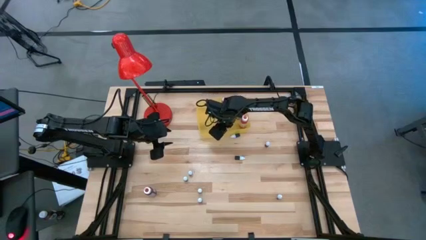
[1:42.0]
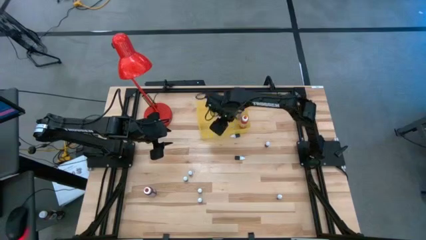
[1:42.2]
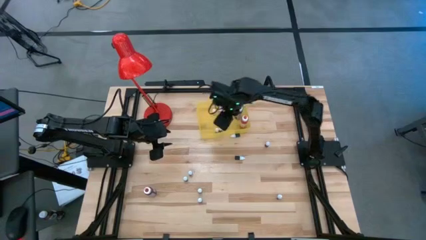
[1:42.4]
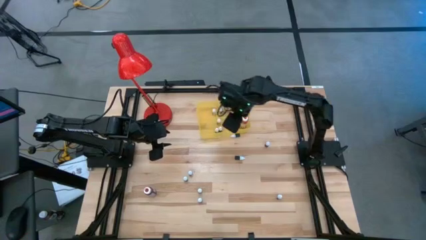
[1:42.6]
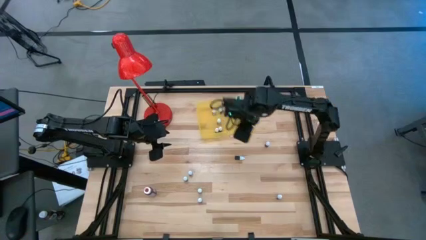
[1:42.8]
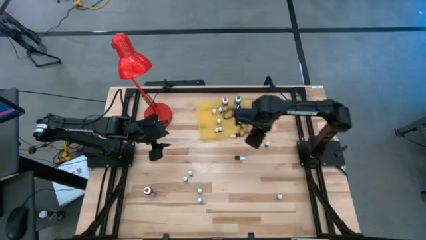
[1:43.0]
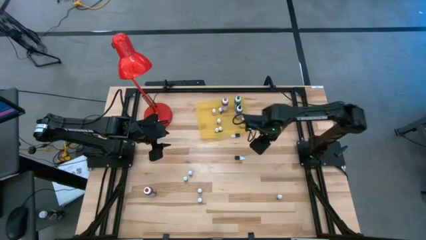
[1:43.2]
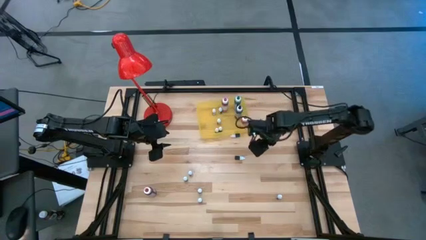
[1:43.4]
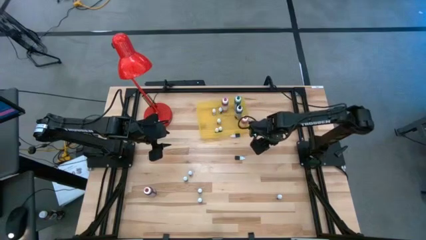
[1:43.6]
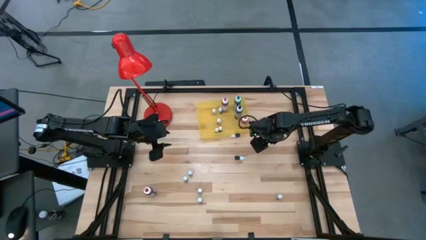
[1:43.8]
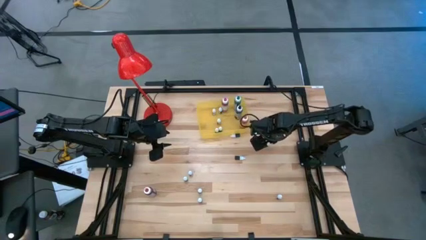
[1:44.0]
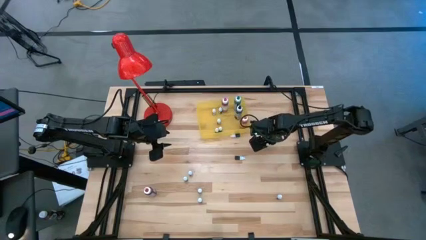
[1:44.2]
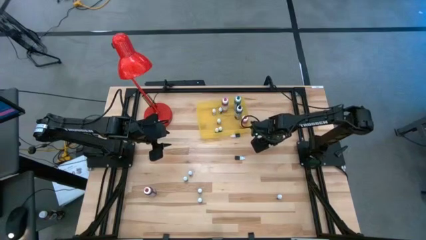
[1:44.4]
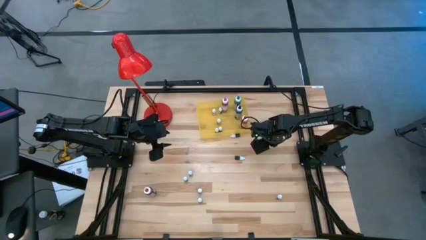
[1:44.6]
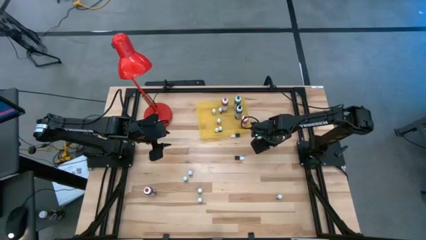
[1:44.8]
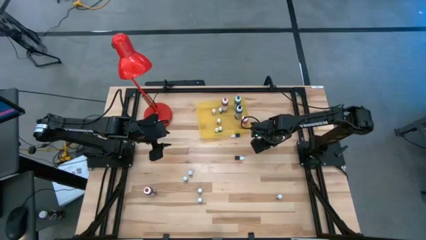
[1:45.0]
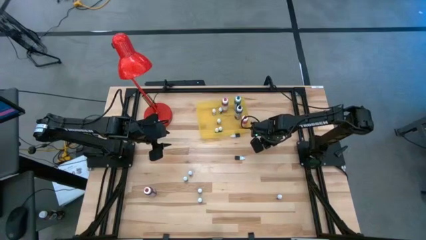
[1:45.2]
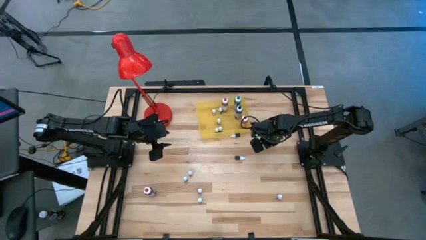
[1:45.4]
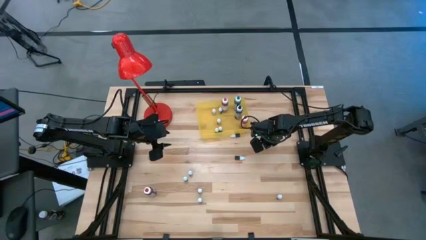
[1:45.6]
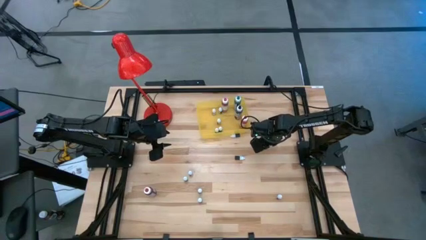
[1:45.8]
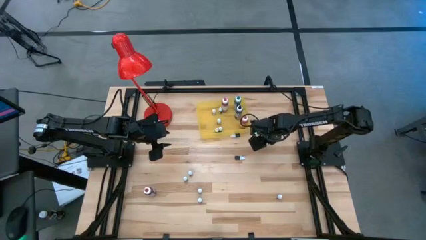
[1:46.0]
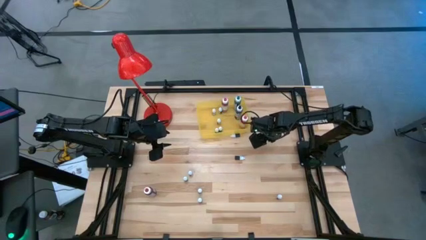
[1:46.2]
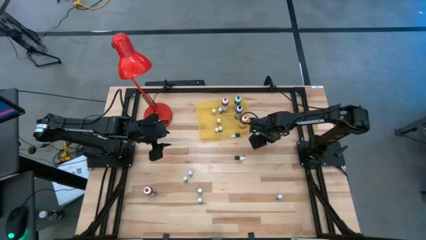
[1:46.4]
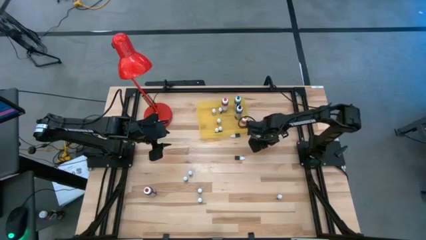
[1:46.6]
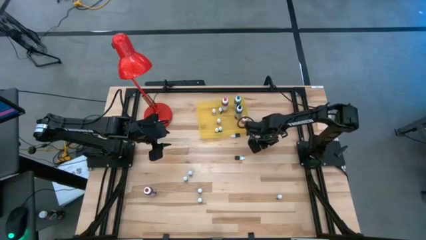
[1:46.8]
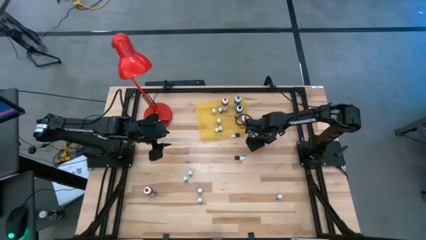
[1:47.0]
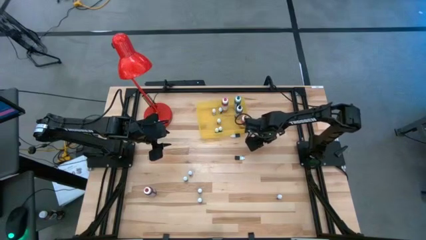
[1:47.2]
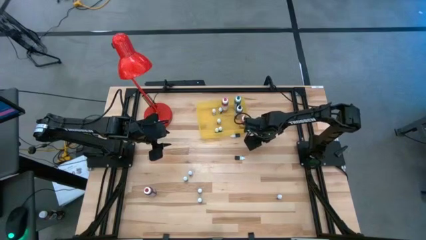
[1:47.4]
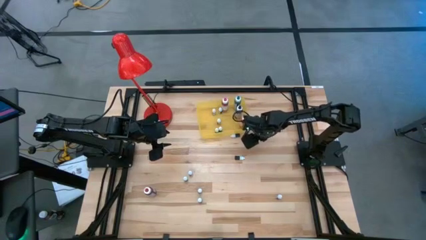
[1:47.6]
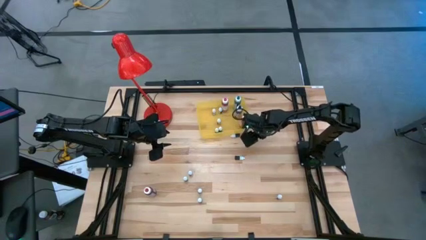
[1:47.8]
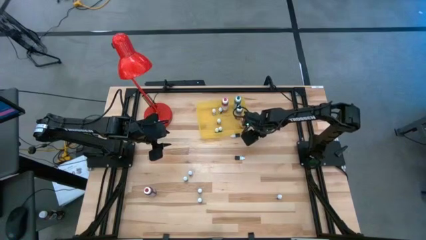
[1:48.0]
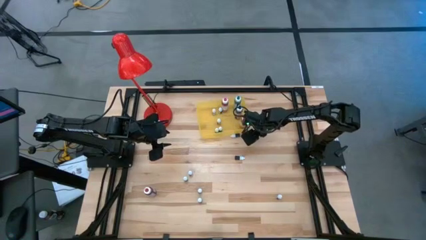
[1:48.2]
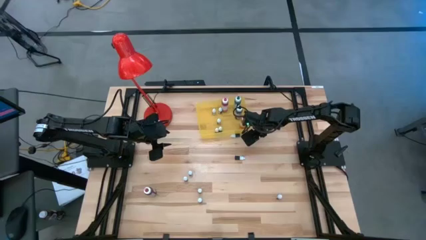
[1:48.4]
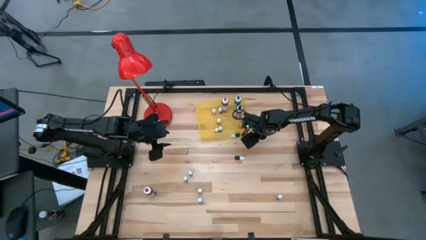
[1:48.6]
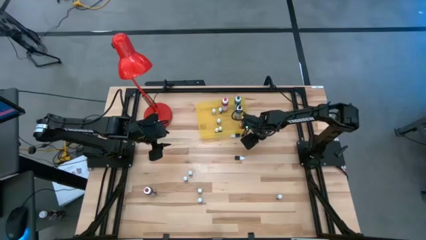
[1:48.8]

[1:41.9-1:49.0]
Task: Pick & Place food coloring
Put the small purple food coloring bottle into the yellow bin

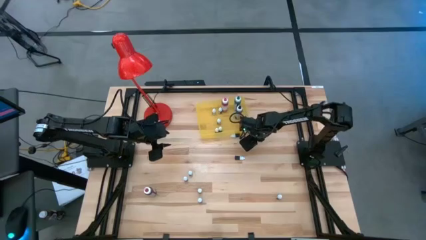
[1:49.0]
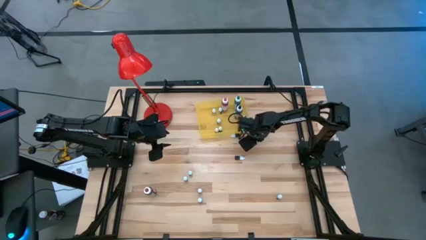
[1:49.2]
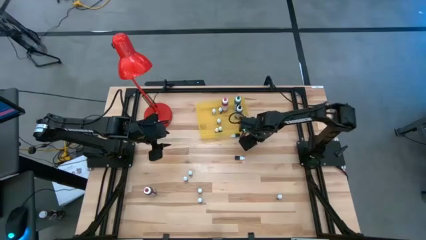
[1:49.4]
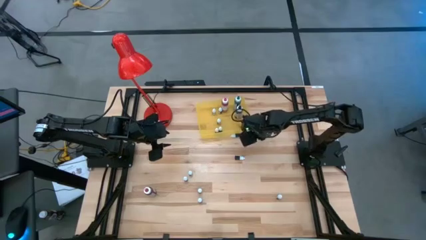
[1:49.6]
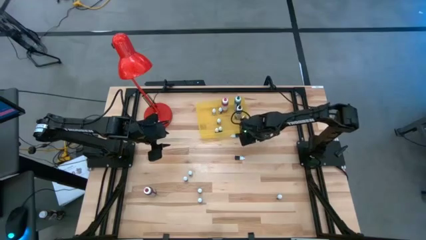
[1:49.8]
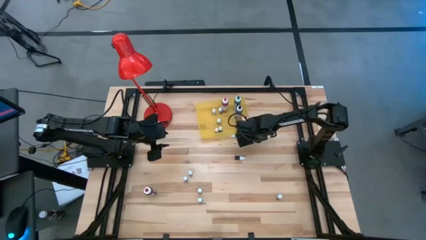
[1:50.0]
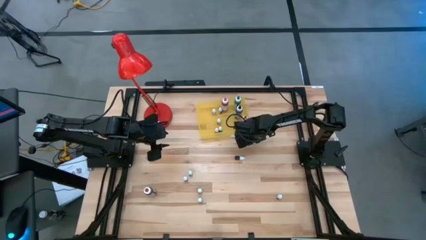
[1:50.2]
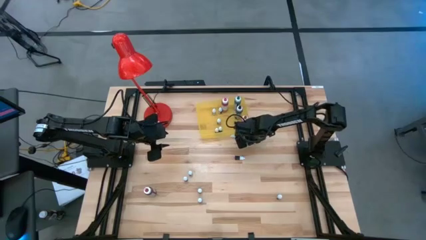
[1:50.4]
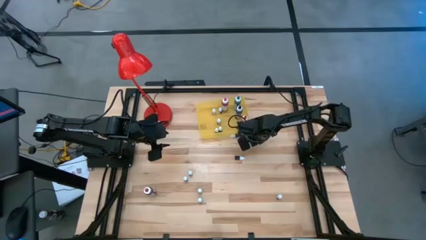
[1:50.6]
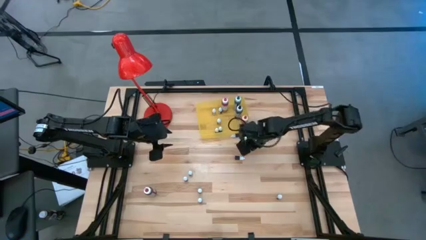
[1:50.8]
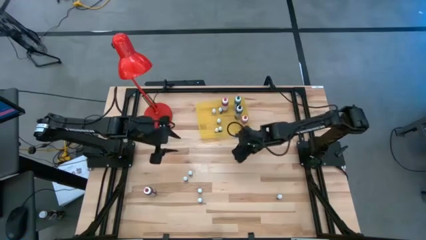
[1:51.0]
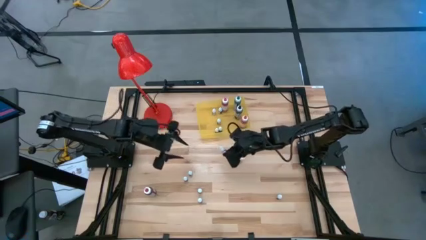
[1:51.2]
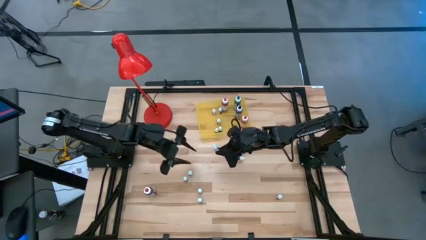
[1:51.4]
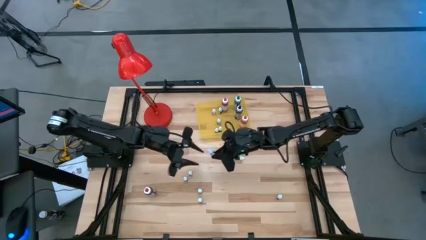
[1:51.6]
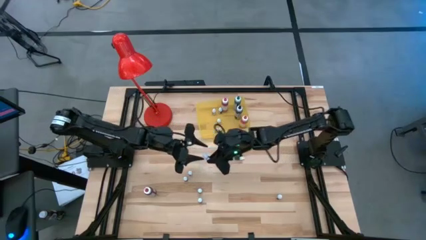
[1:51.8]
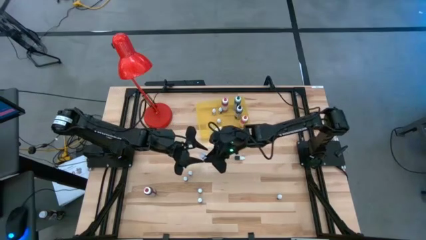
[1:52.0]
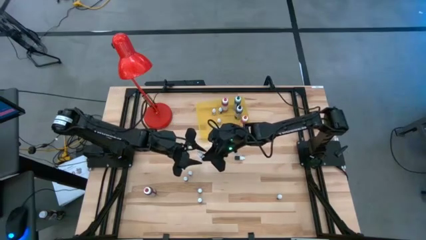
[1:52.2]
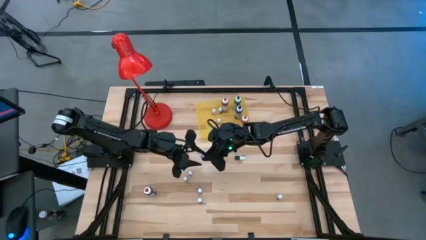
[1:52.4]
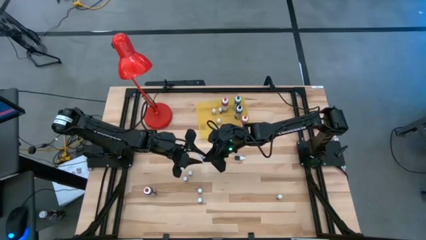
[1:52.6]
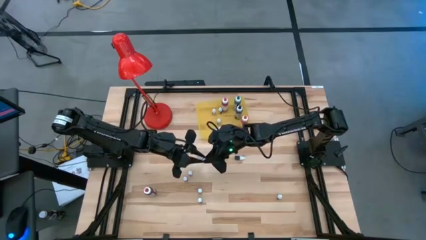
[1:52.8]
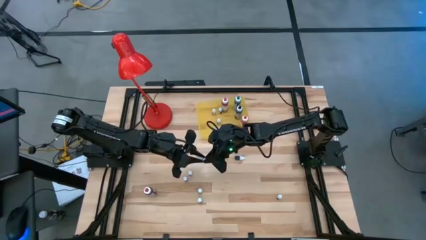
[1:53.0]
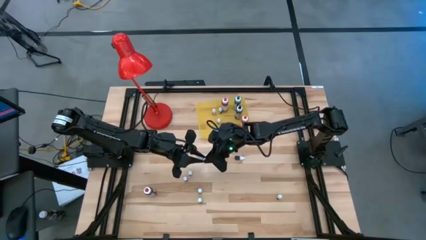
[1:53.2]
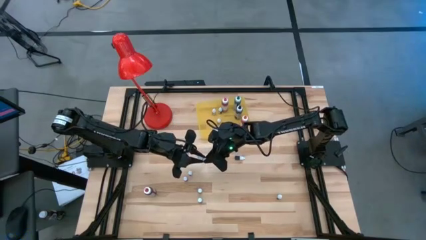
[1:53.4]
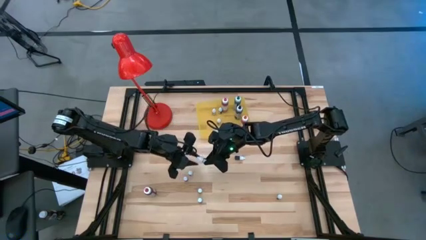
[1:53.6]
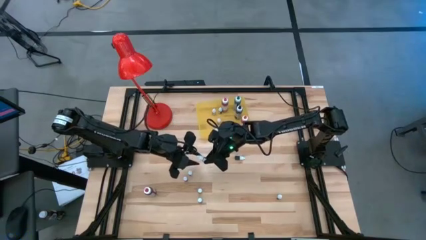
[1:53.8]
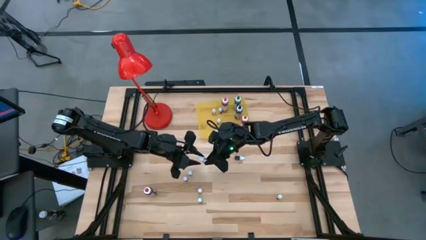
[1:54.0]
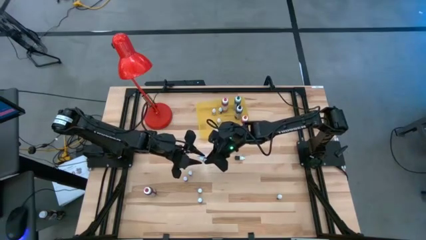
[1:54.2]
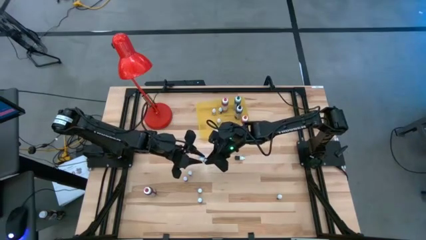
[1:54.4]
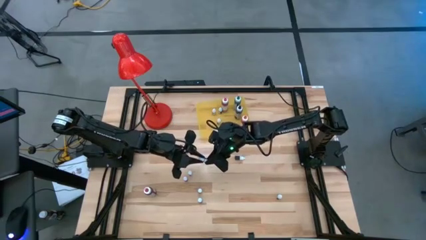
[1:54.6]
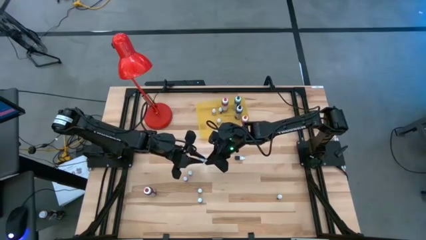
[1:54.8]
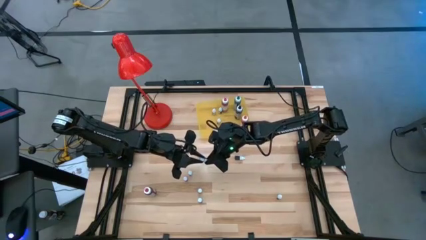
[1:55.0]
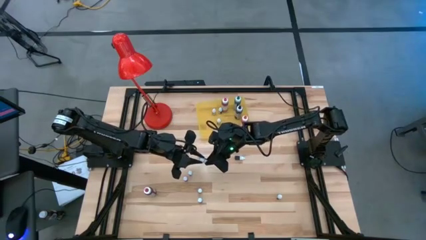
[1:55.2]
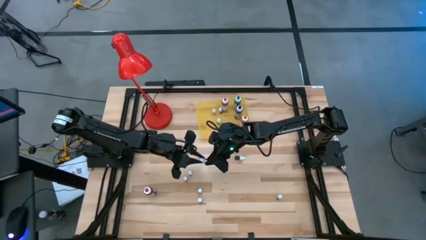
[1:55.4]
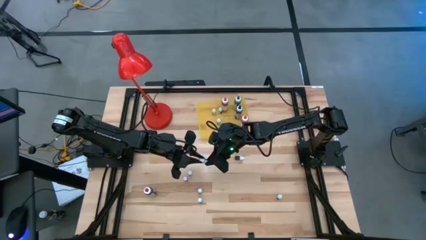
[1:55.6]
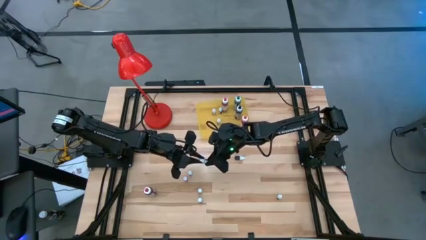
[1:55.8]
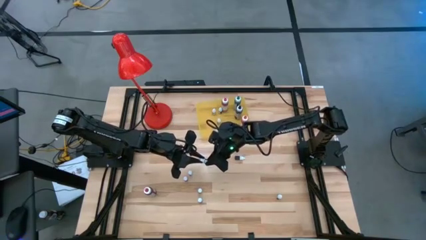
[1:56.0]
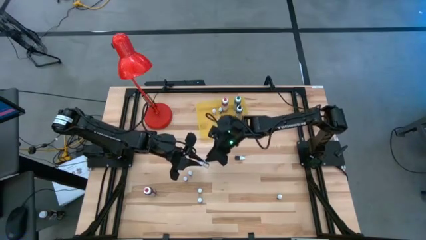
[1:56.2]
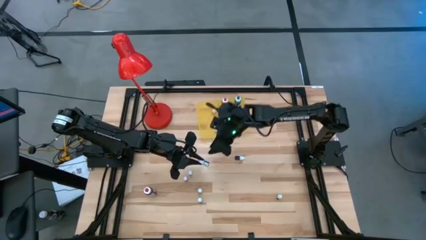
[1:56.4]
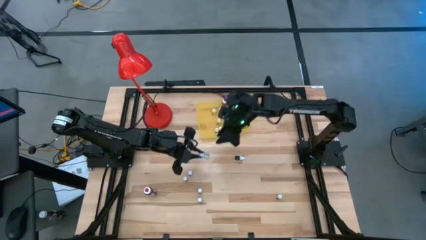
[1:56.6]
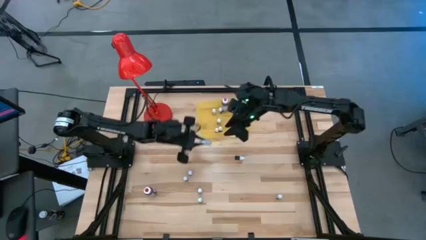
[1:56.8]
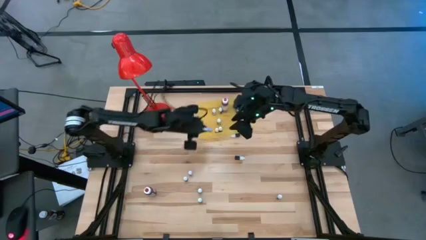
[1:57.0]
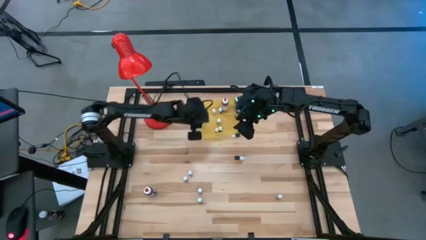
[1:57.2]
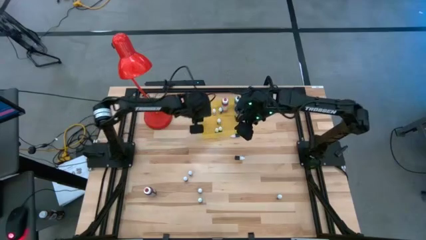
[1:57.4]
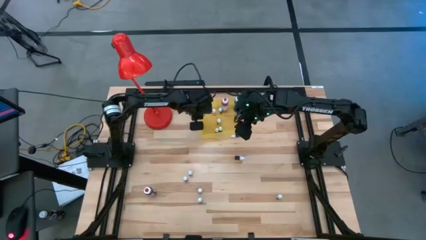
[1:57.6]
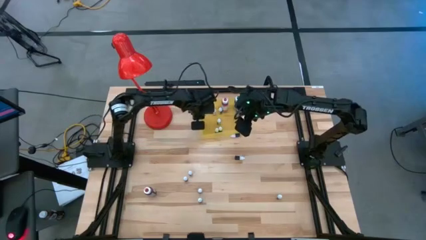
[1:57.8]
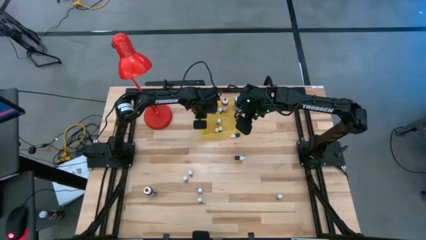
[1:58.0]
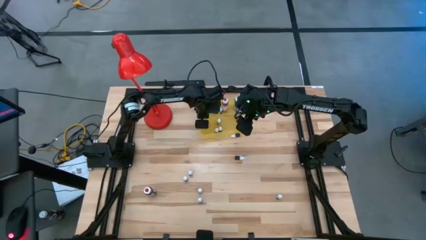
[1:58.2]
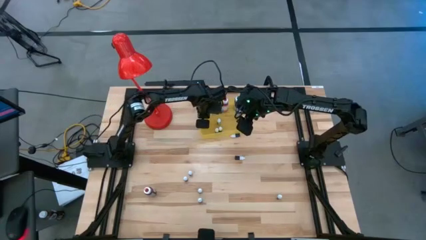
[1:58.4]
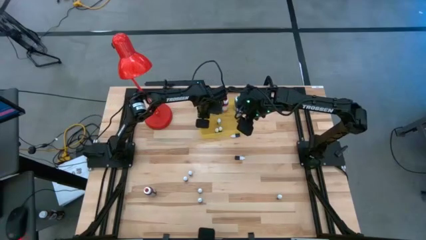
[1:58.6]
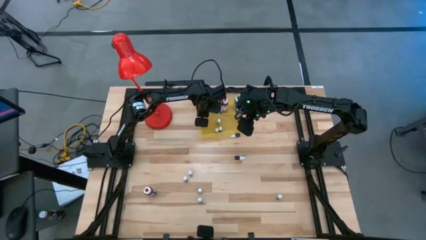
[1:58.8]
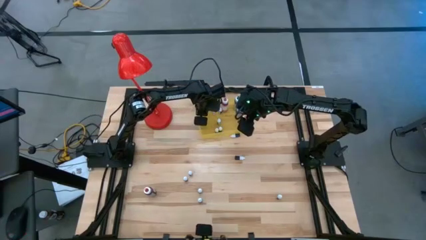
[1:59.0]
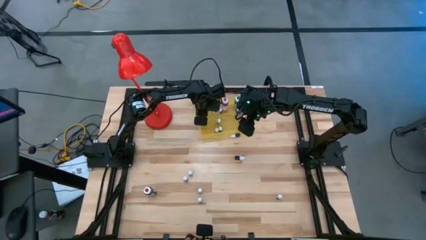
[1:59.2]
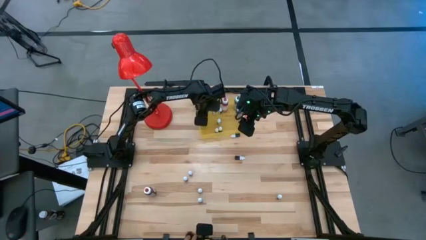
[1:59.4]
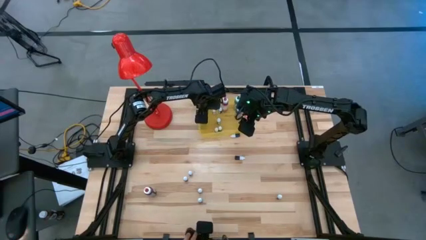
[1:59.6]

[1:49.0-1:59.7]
Put the small purple food coloring bottle into the yellow bin
